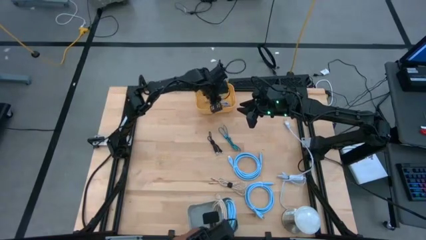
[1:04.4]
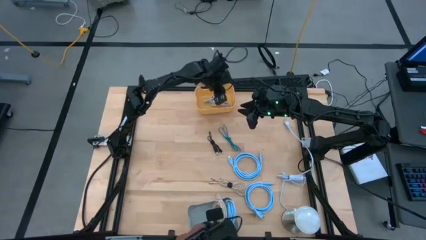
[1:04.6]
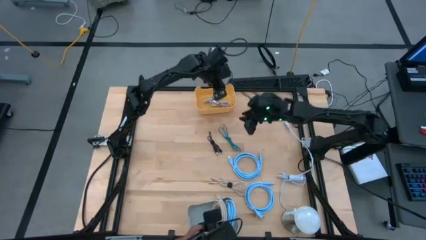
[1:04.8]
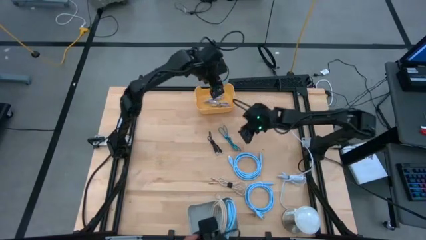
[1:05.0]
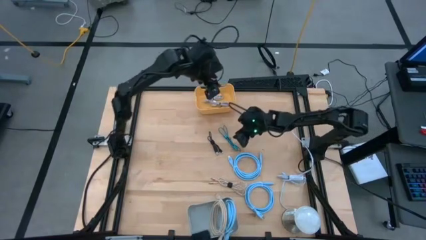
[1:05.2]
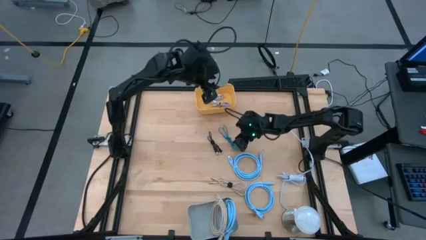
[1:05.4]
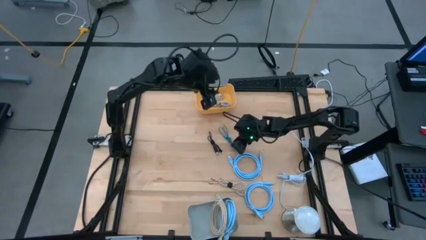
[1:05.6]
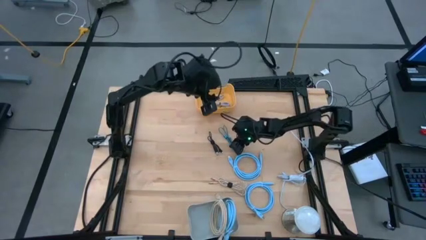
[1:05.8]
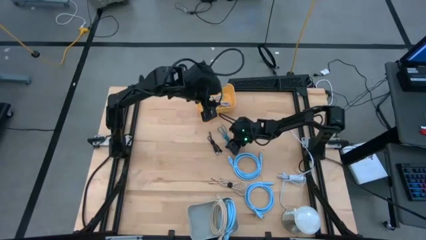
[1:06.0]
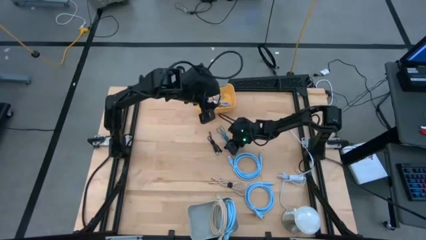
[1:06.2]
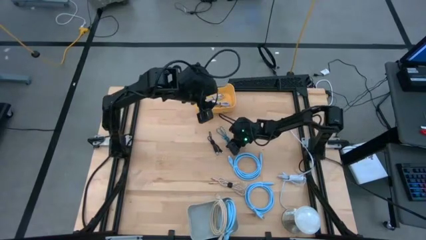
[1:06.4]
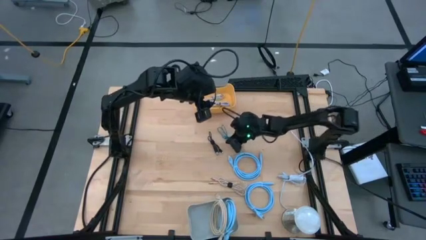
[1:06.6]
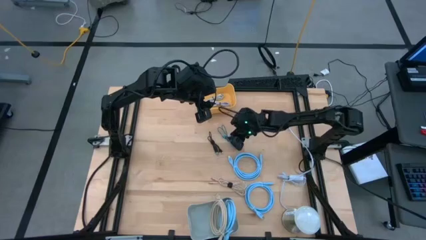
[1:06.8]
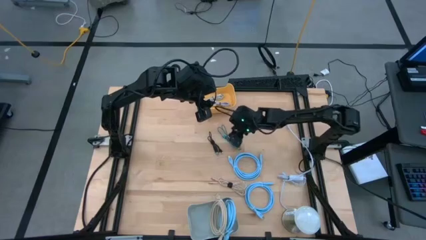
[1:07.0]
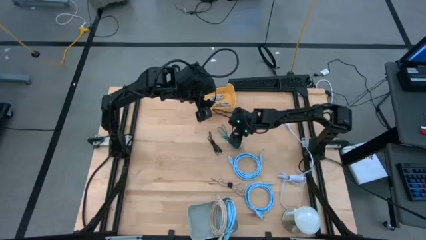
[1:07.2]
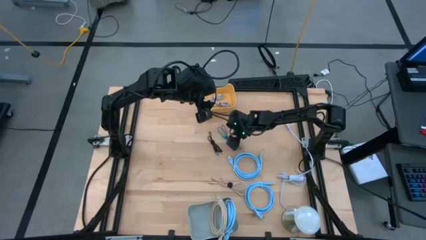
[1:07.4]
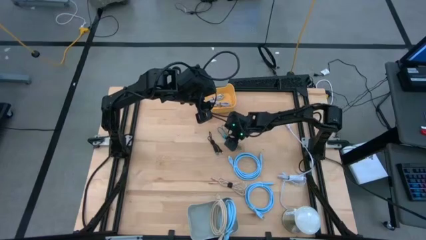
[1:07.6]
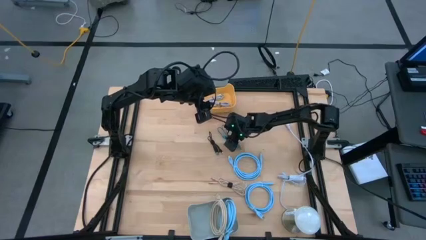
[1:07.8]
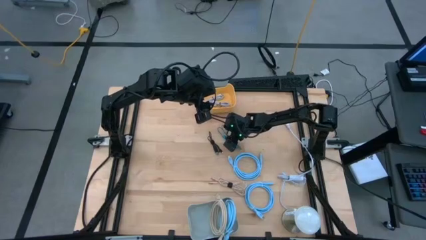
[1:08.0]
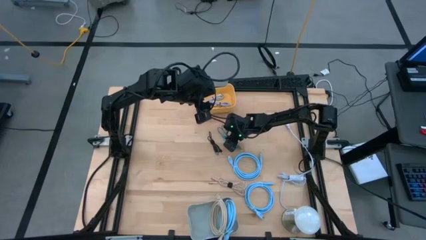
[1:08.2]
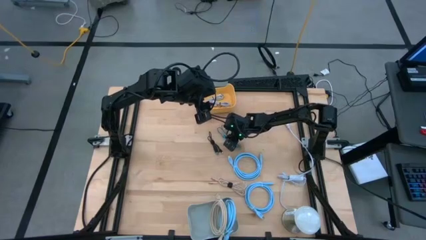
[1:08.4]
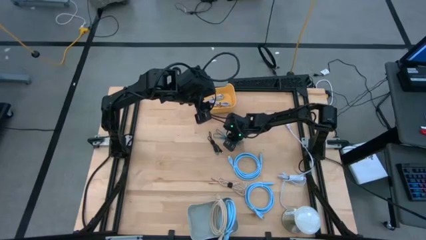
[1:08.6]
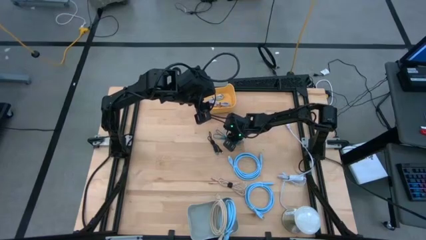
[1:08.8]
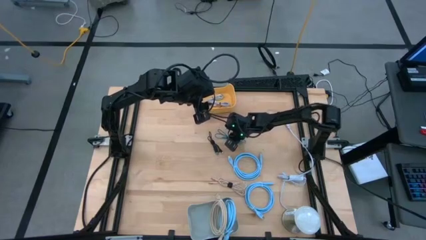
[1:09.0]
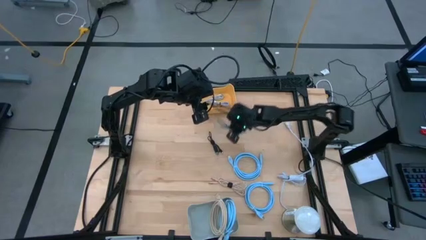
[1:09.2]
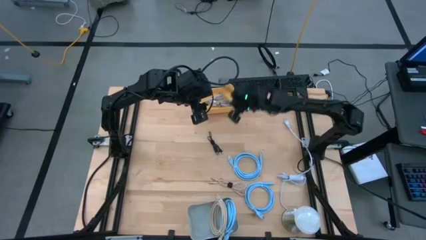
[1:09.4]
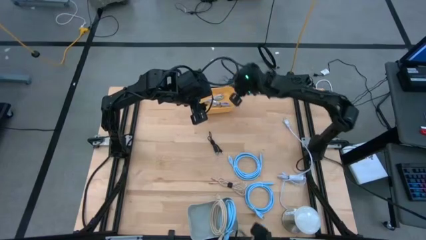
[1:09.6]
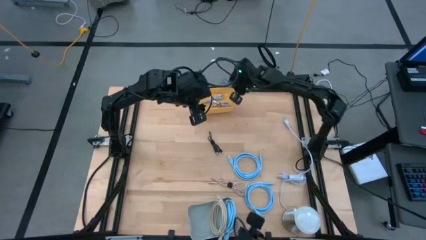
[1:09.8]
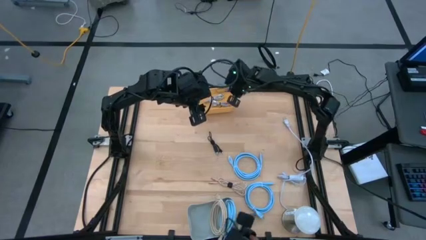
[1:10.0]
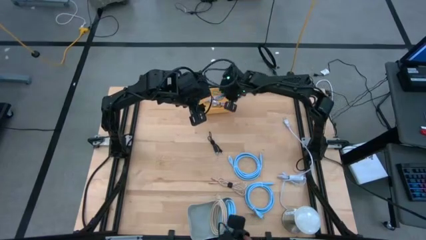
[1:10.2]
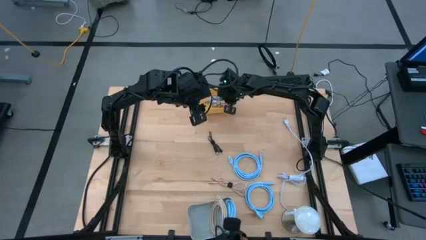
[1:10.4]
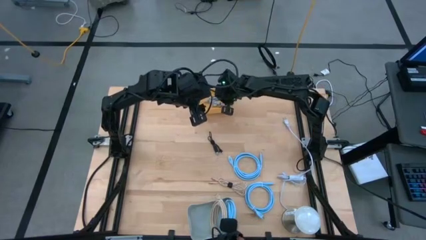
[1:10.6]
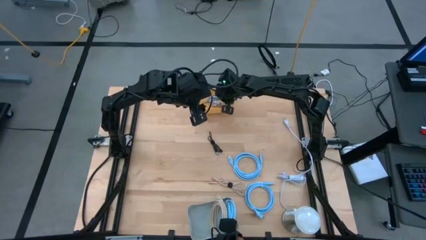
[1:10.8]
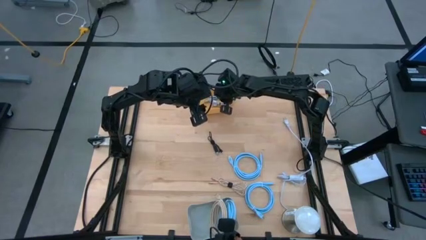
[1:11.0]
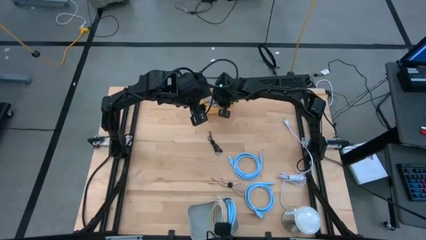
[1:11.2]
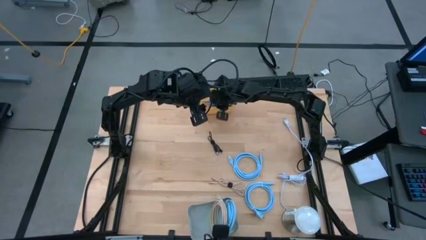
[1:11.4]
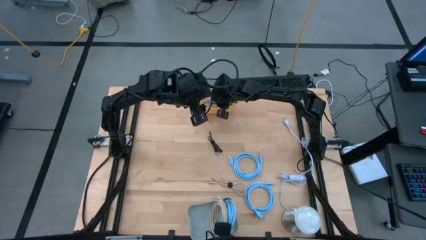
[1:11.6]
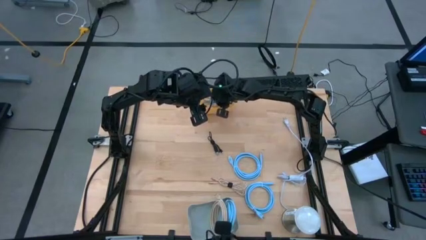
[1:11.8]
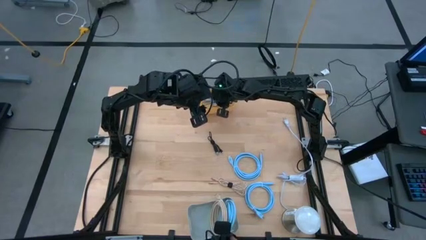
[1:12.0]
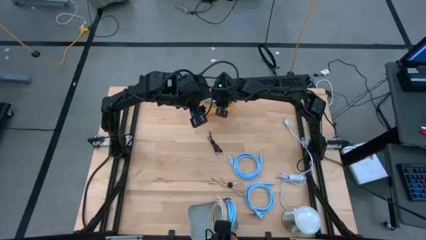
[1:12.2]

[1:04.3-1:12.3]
Task: Sort cables into bins
Put the blue patterned charger cable into the yellow bin

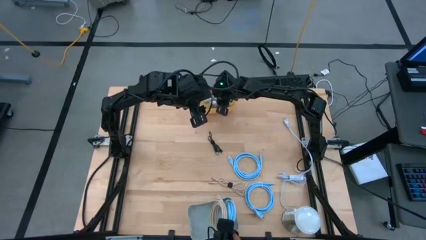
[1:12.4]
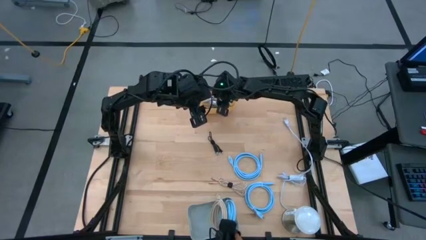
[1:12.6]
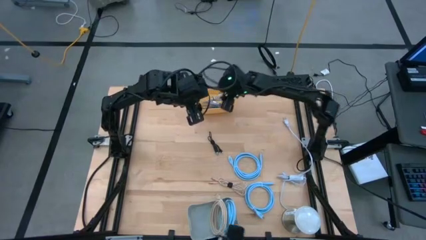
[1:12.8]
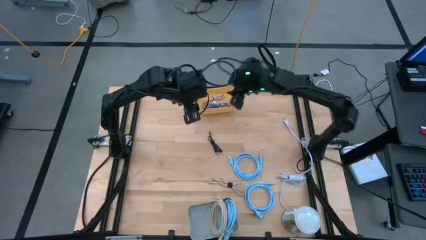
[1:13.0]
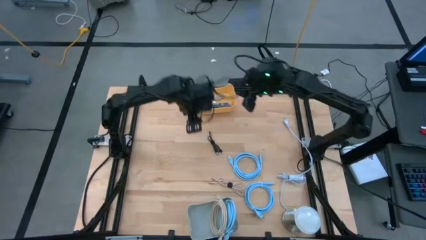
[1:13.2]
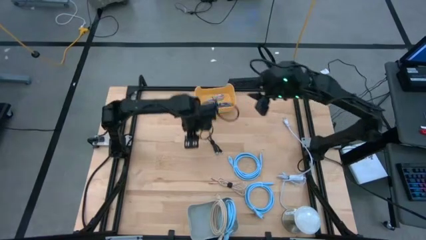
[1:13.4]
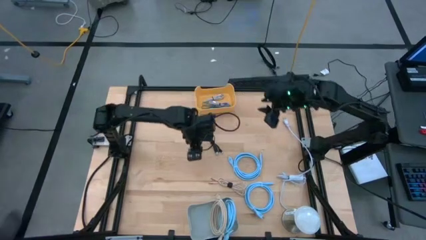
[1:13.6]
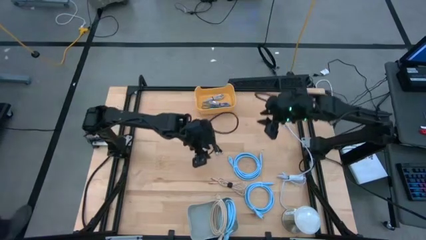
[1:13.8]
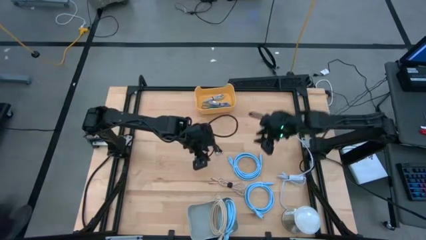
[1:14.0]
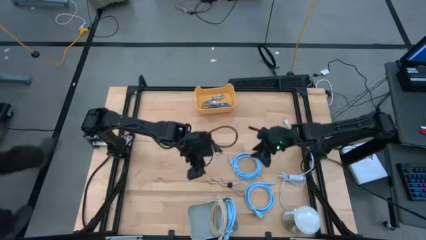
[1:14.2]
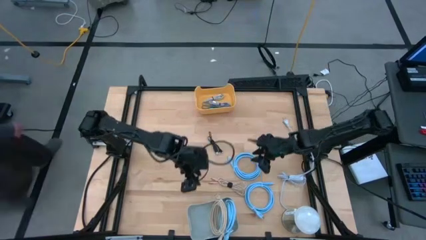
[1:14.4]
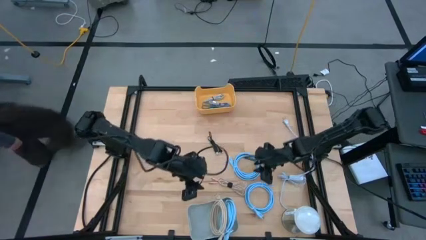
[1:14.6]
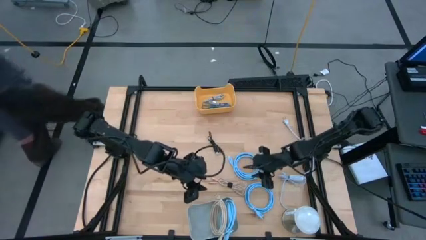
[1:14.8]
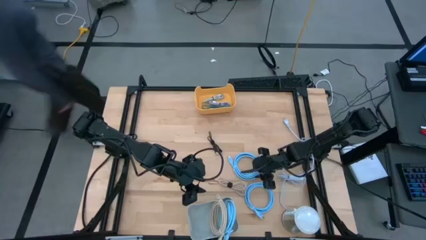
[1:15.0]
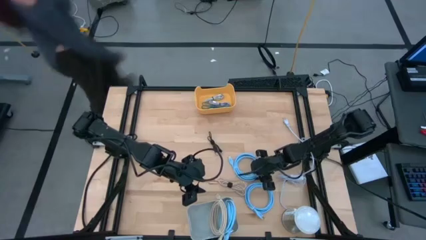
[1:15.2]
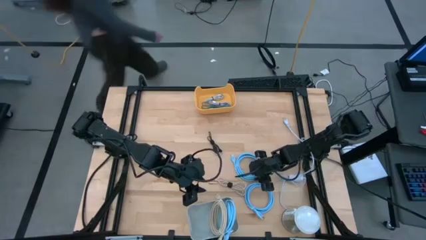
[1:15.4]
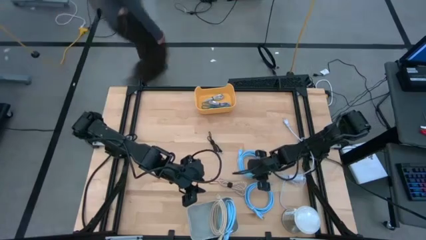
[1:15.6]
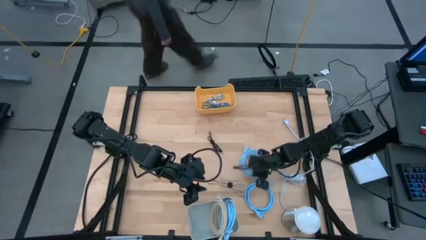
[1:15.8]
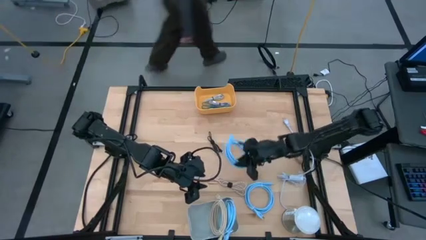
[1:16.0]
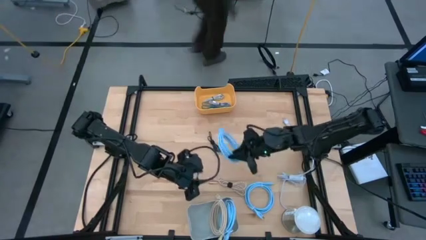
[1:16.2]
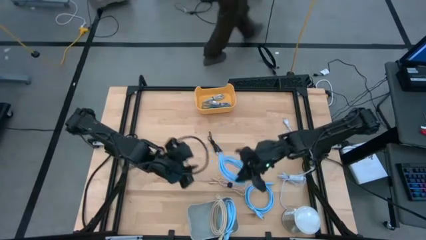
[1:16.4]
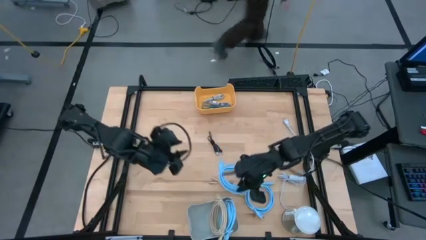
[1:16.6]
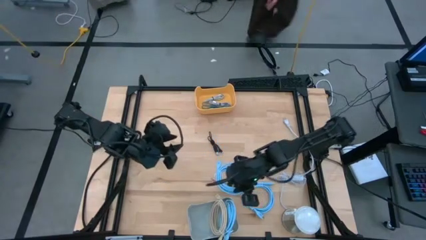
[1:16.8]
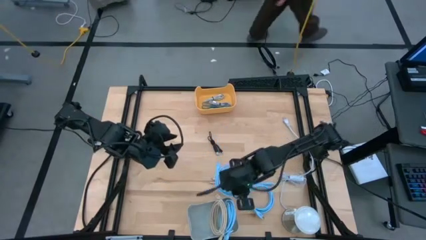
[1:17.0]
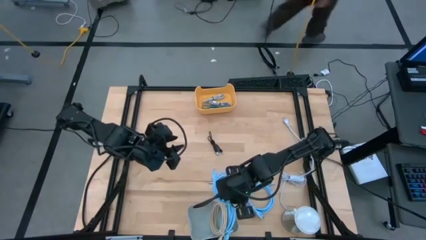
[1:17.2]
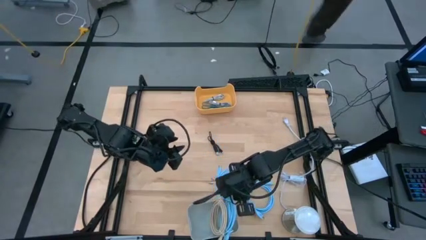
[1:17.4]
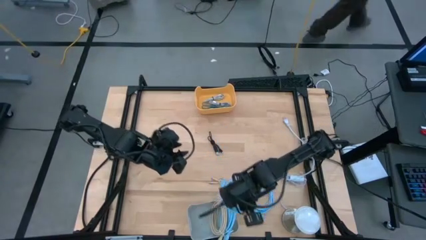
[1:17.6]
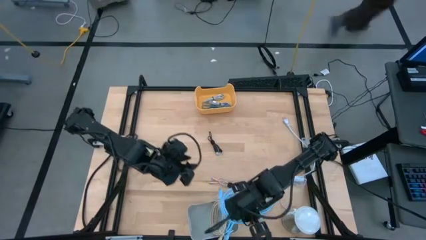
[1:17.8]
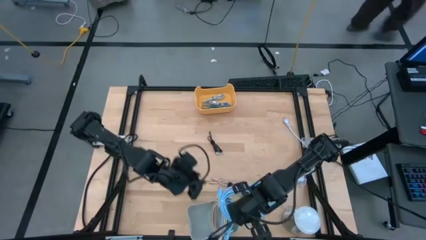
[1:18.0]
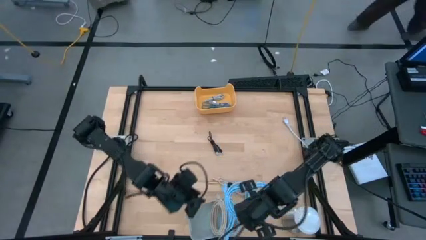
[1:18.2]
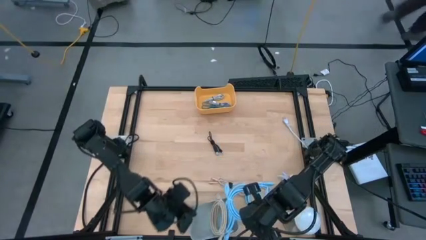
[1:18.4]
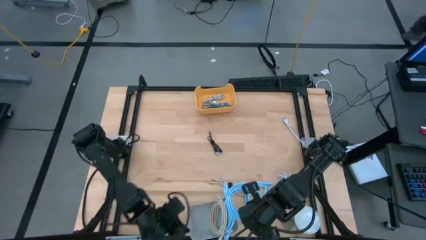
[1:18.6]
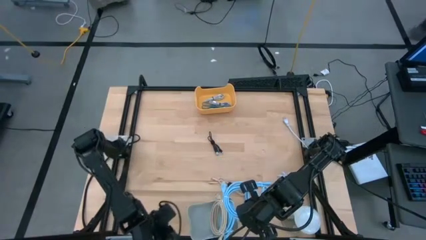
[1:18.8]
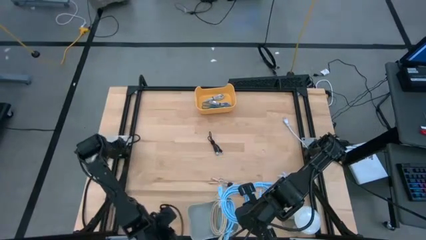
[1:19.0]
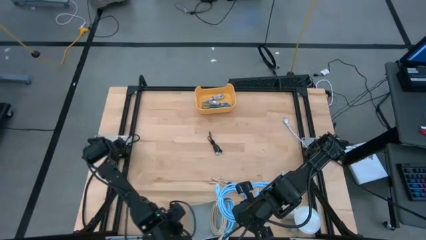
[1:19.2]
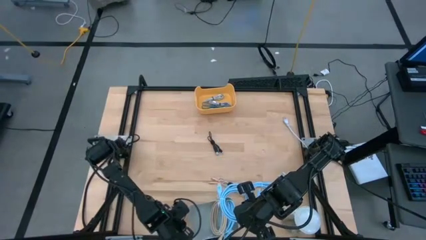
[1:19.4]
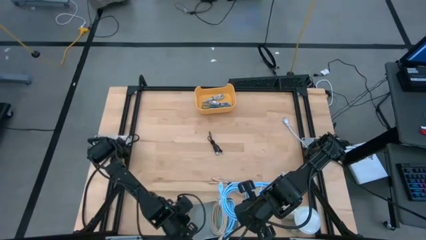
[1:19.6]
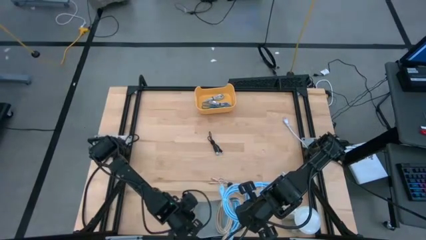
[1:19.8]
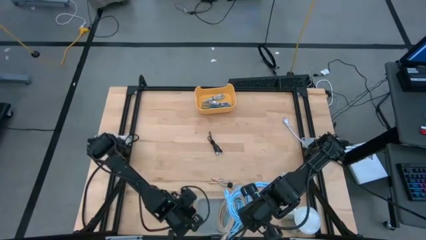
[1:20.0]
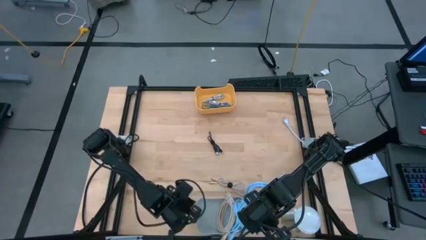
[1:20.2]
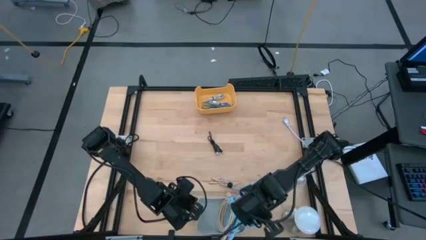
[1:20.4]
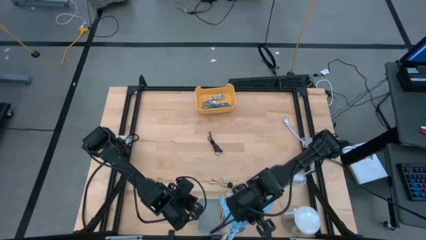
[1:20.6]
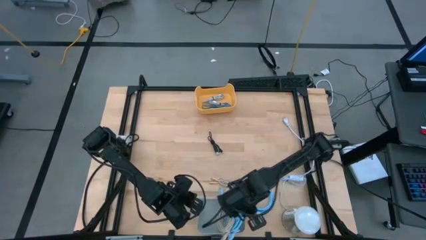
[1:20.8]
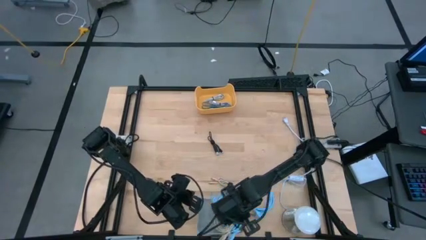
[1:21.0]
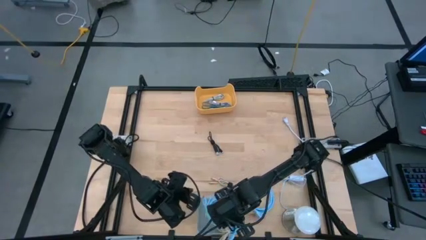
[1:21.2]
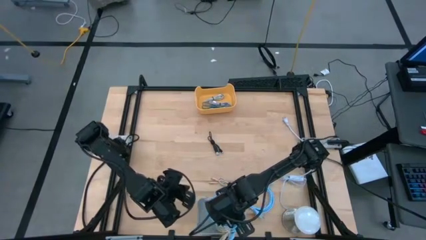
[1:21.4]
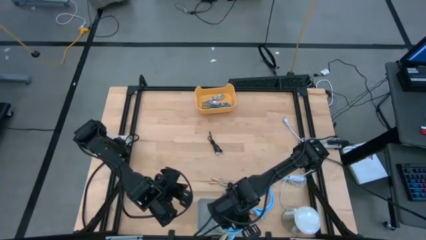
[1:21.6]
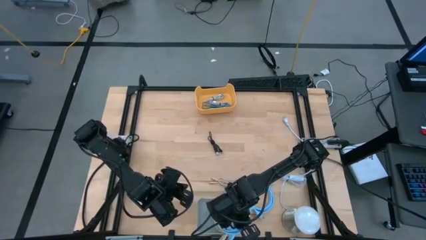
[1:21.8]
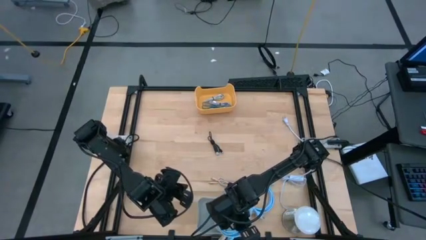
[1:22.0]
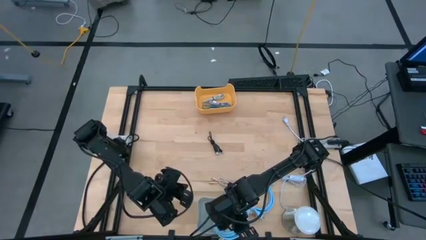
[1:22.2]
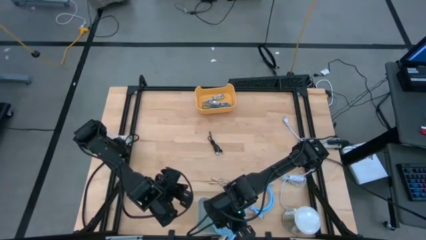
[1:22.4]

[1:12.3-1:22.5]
Put the blue HDMI cable into the gray bin
